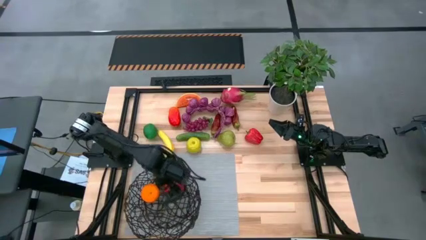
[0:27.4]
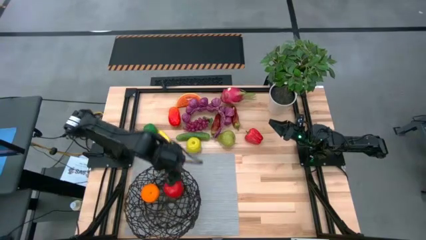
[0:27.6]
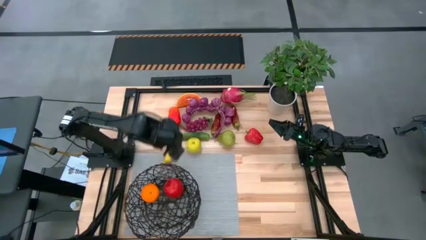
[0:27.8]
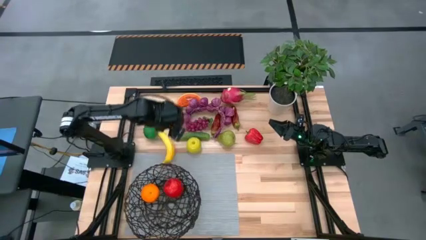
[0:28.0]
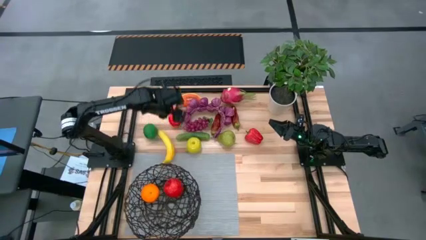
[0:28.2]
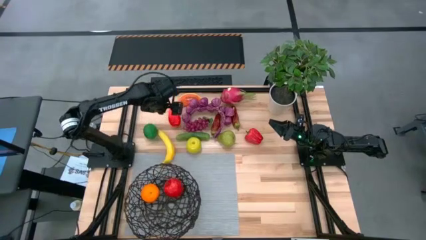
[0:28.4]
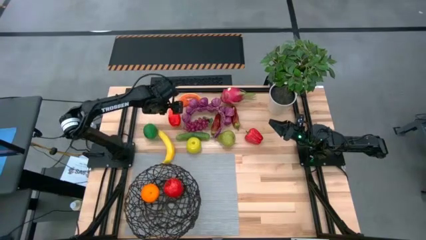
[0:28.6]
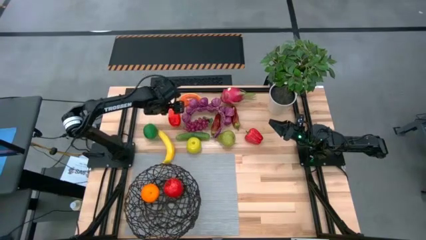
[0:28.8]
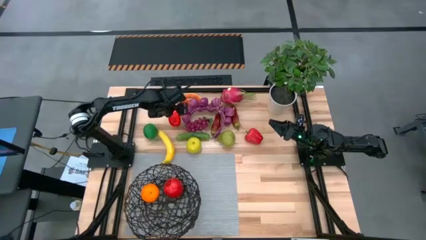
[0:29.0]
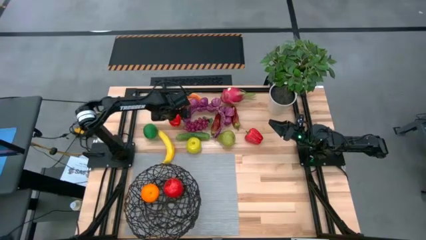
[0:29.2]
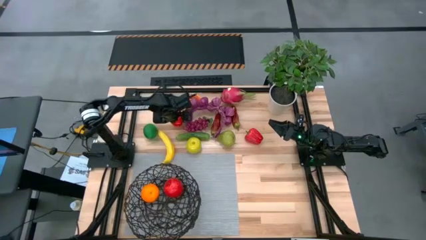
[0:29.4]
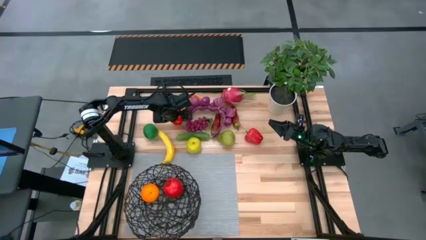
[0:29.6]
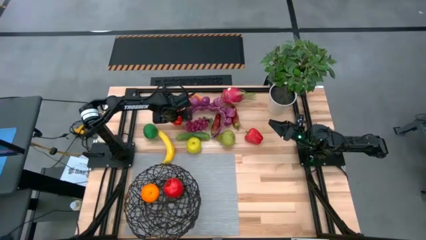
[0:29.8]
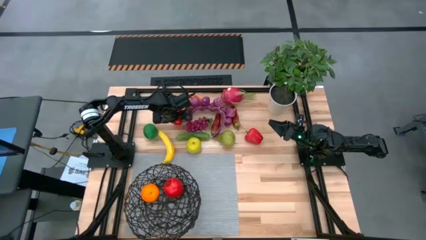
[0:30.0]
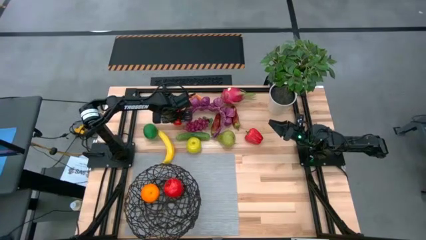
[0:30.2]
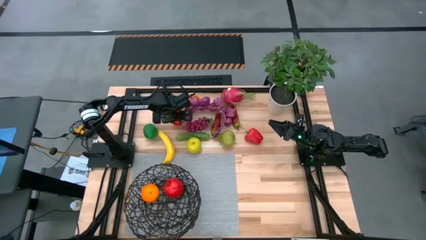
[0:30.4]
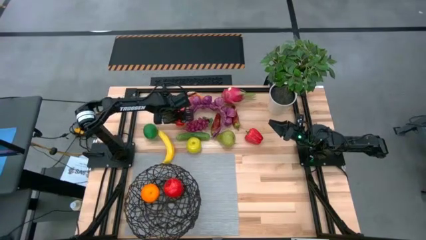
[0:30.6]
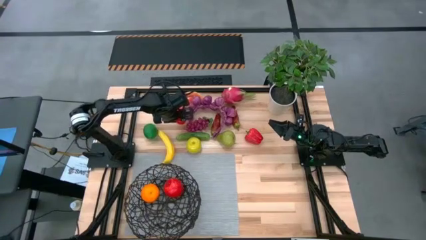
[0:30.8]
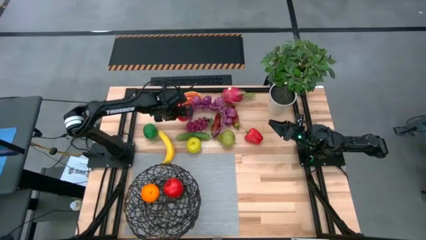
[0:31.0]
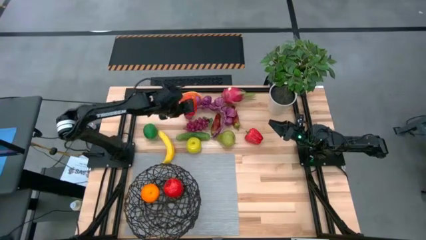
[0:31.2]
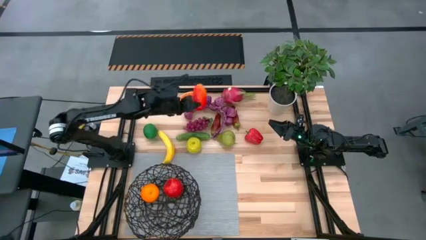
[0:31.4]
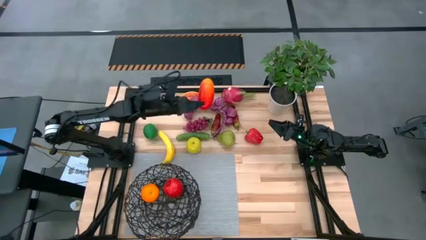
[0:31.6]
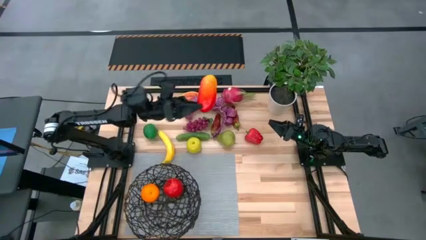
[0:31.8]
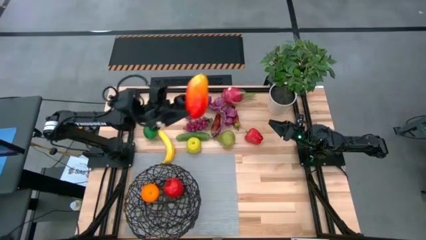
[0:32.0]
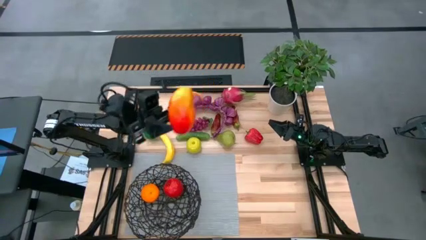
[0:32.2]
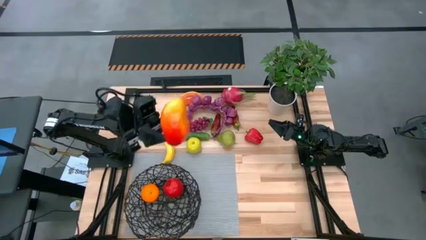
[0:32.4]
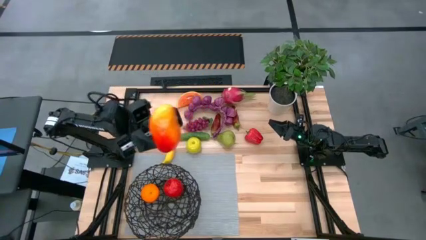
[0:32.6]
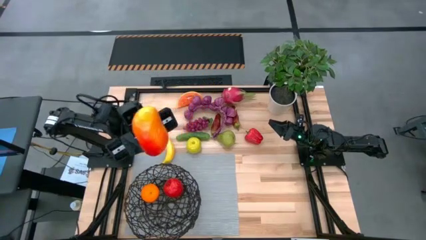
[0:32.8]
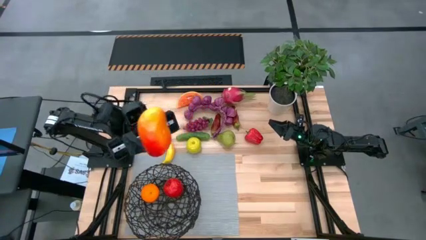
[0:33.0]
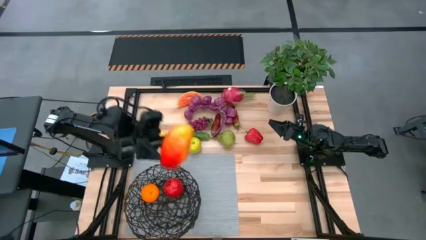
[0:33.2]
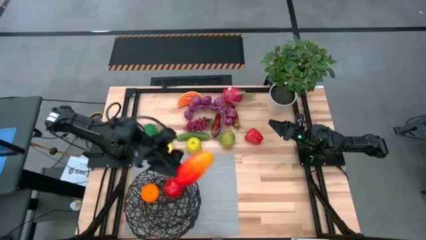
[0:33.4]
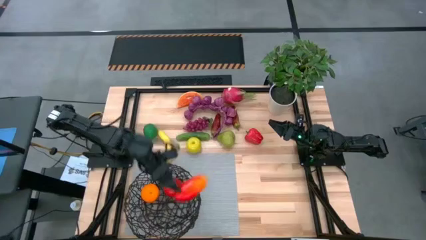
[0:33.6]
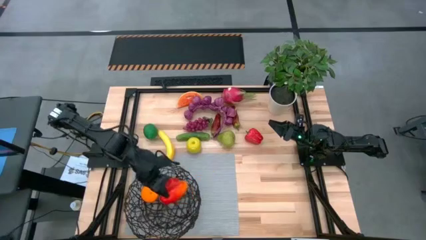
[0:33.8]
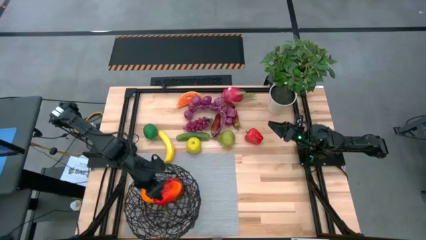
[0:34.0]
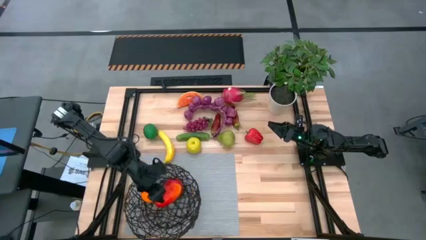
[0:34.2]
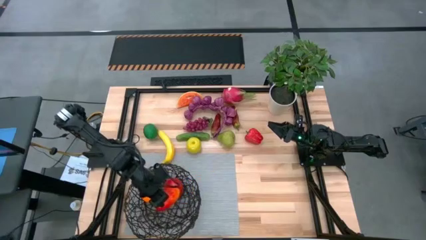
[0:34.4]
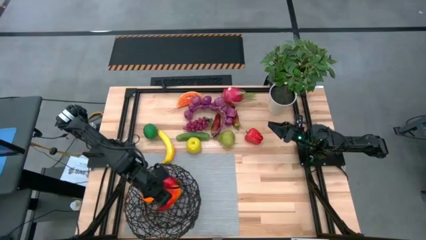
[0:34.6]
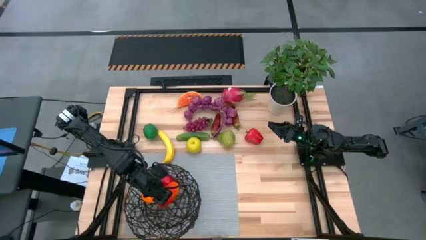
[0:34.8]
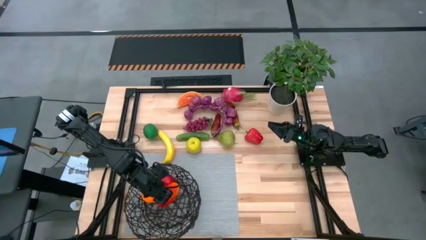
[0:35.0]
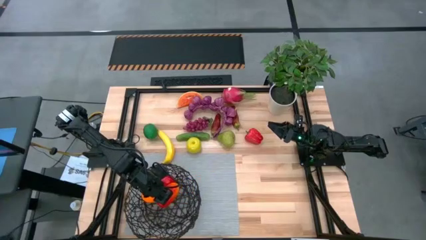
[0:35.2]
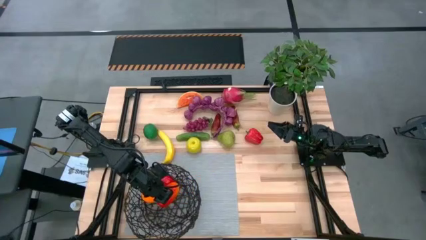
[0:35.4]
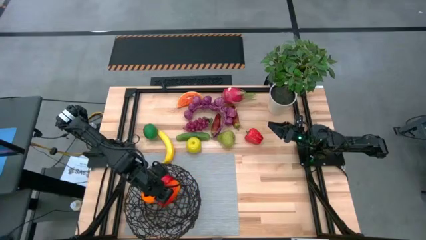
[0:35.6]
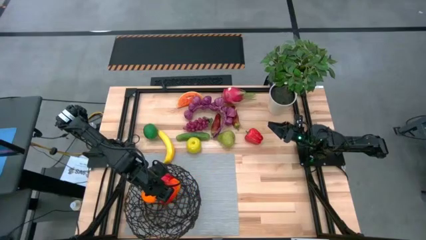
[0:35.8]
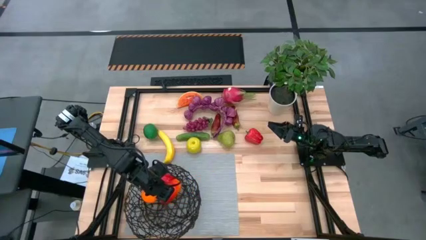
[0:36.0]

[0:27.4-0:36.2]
Task: Build produce basket
Put the mango into the black wire basket

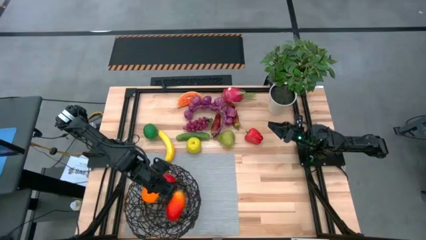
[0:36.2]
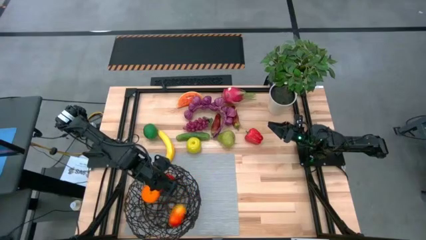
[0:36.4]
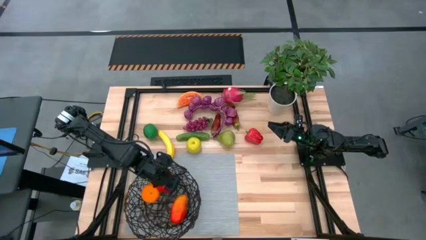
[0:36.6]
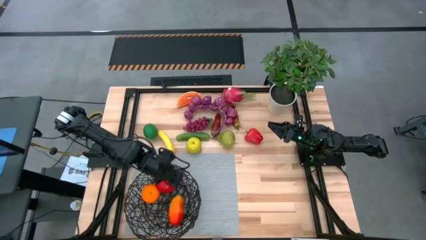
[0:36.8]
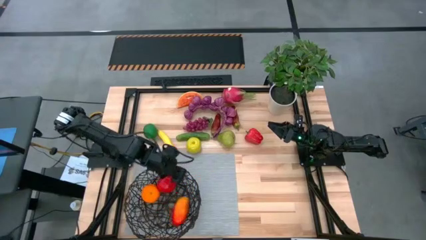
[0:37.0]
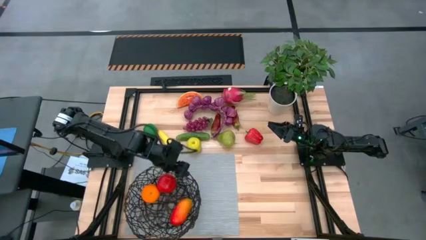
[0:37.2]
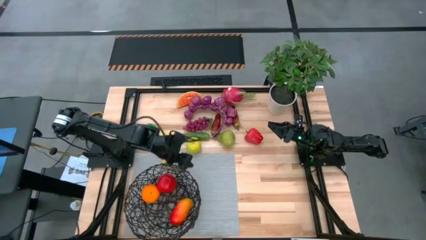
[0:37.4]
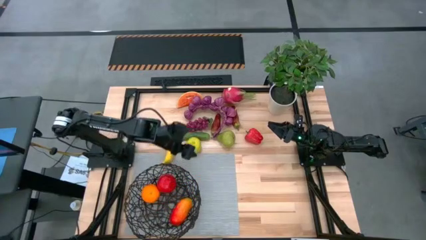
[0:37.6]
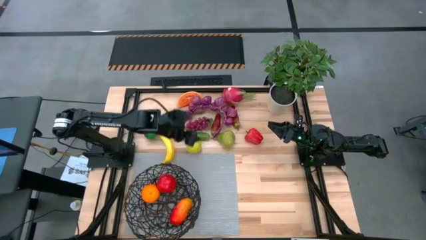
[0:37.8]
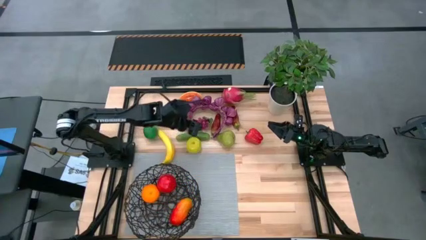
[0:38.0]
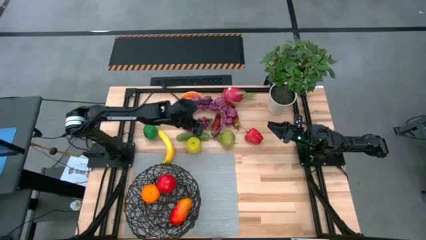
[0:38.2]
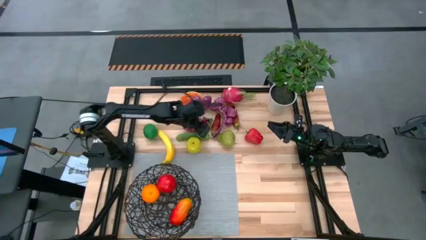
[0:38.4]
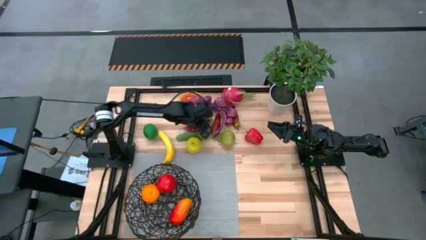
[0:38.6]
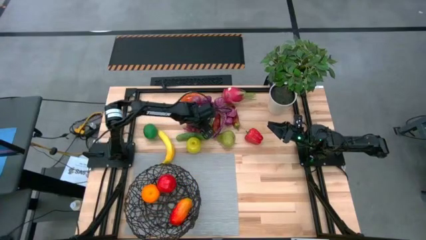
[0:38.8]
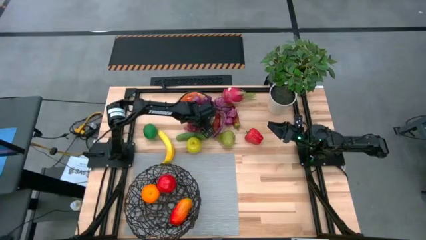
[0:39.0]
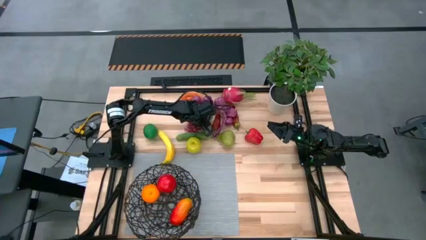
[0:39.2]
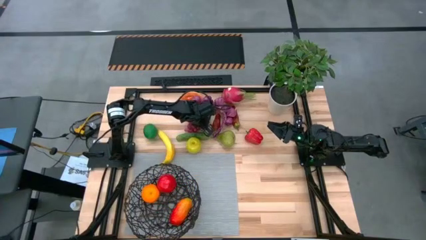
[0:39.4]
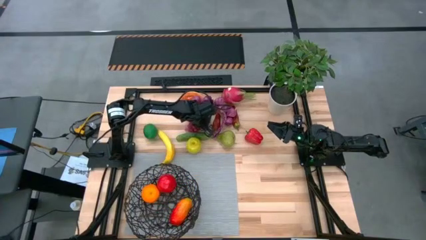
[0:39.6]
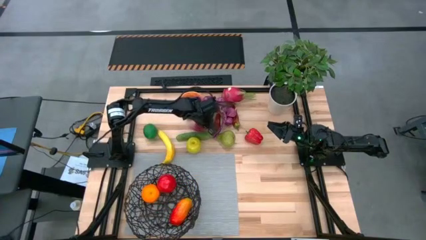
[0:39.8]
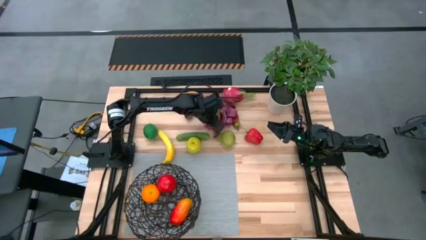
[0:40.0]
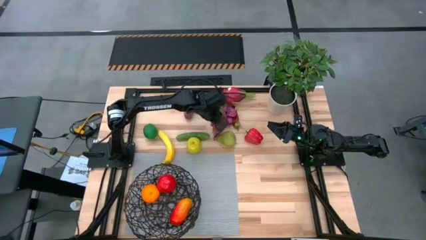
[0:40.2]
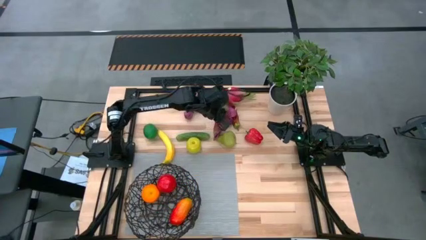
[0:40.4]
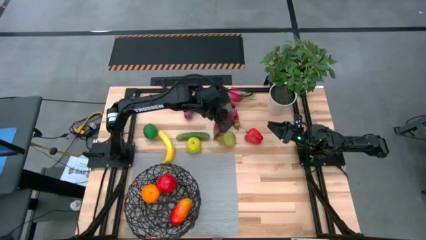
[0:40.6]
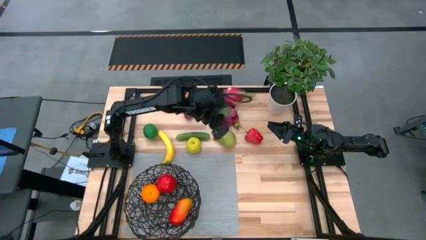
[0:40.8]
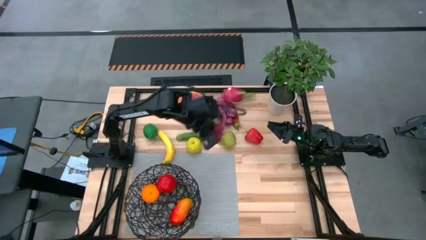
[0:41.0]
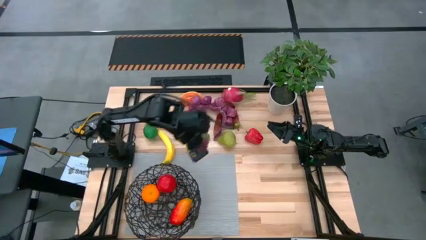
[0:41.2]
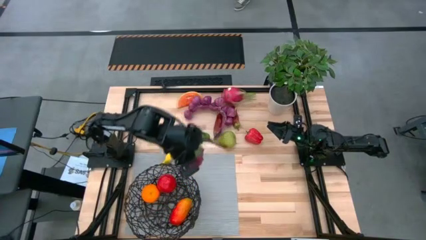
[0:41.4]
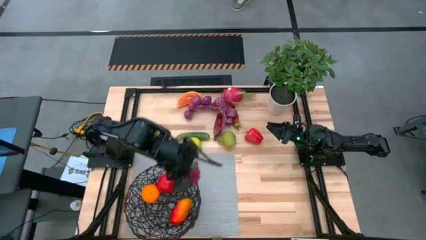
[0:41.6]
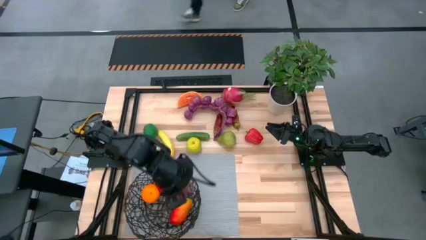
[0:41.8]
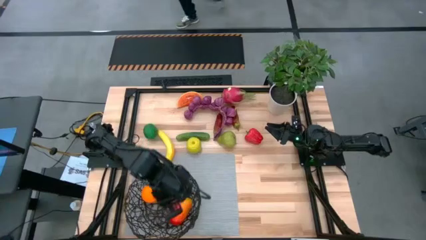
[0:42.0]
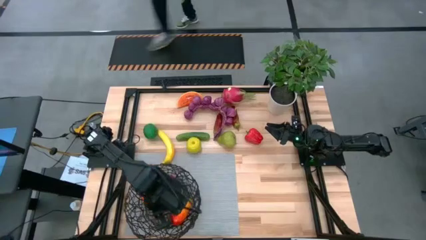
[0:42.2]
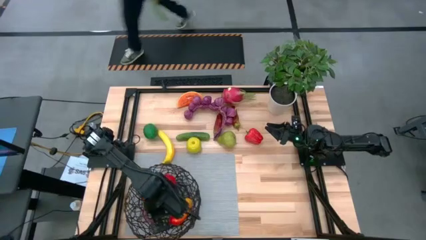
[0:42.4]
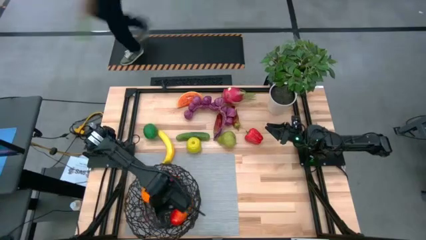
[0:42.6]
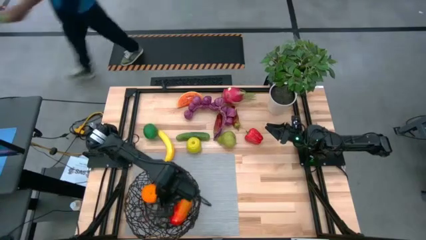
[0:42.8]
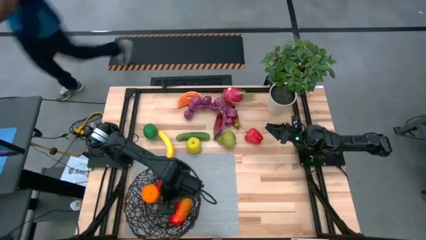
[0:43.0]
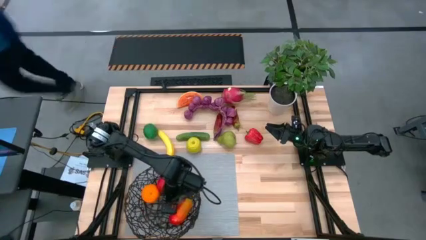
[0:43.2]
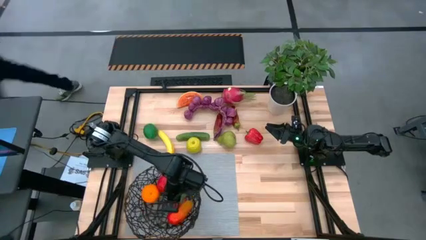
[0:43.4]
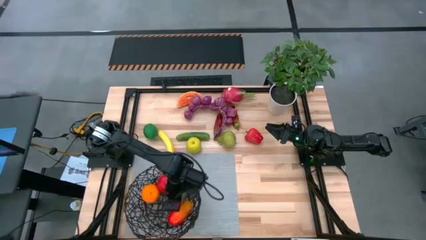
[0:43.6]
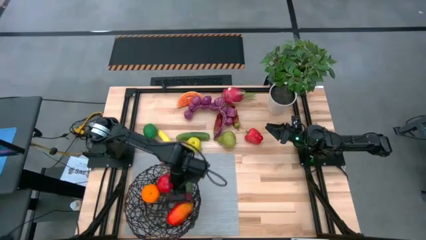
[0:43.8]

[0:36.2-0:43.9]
Put the grapes into the black wire basket
